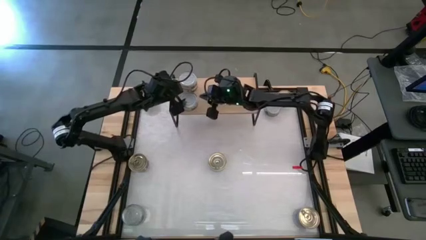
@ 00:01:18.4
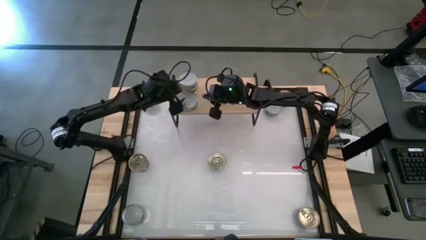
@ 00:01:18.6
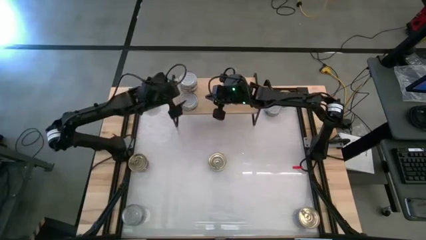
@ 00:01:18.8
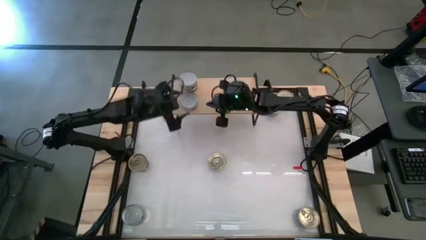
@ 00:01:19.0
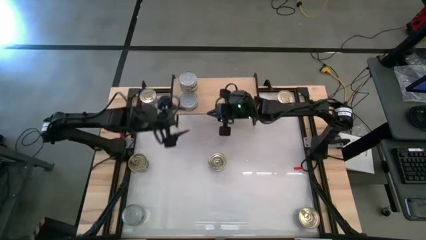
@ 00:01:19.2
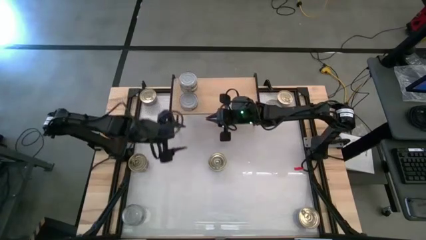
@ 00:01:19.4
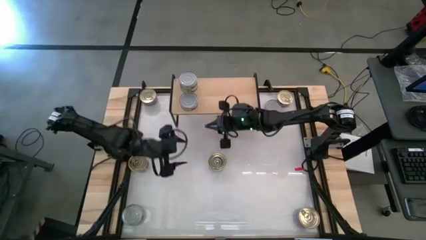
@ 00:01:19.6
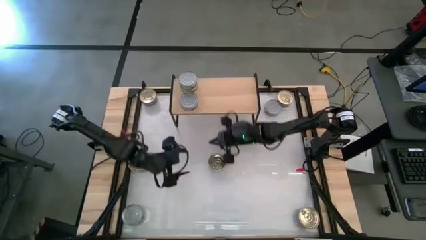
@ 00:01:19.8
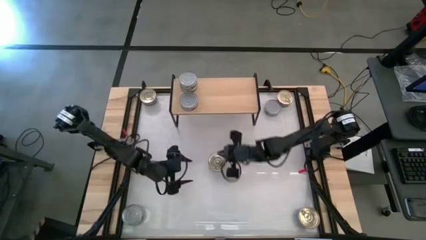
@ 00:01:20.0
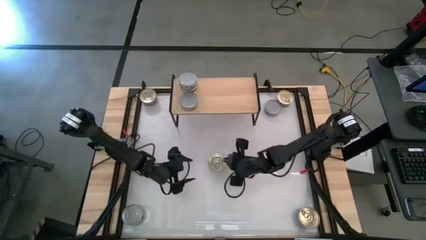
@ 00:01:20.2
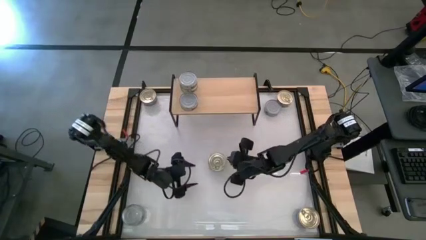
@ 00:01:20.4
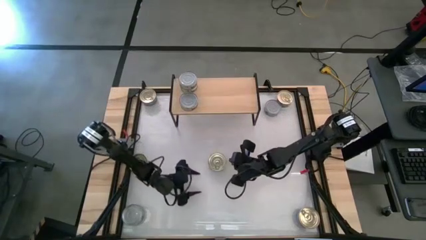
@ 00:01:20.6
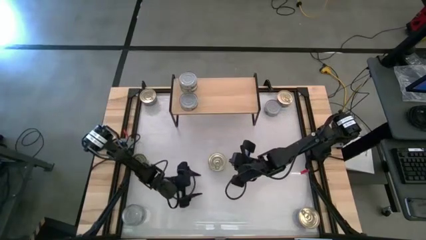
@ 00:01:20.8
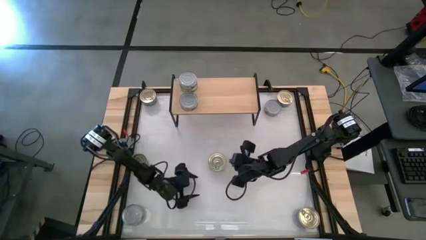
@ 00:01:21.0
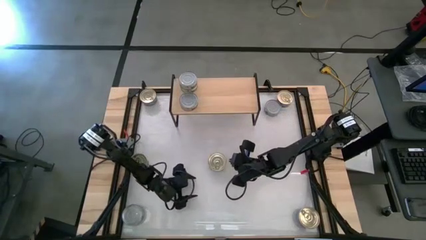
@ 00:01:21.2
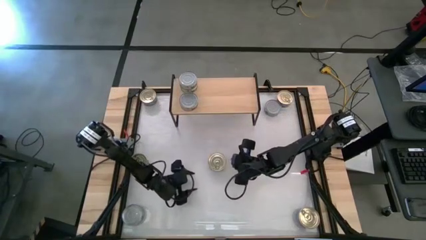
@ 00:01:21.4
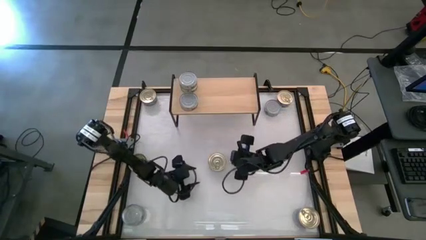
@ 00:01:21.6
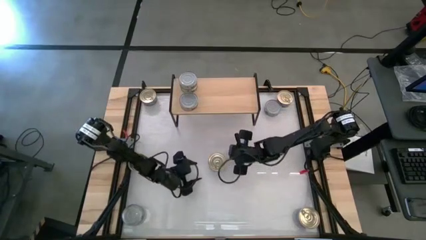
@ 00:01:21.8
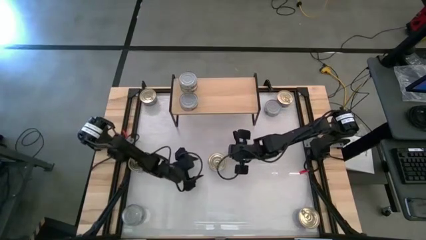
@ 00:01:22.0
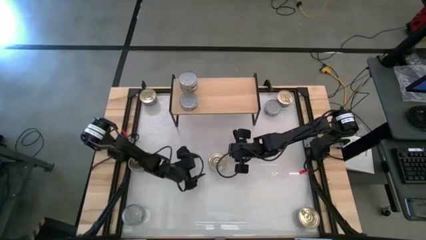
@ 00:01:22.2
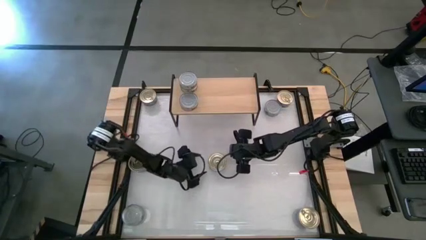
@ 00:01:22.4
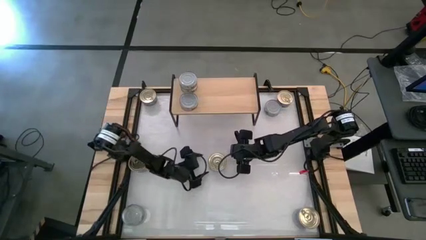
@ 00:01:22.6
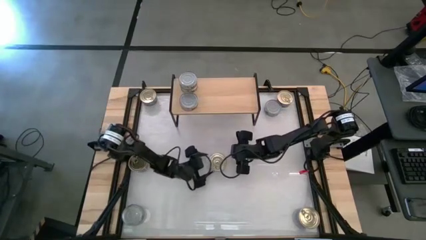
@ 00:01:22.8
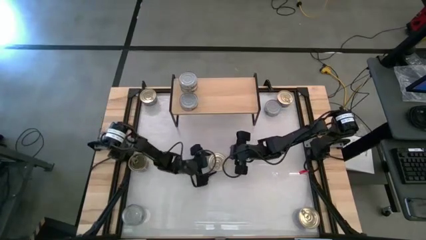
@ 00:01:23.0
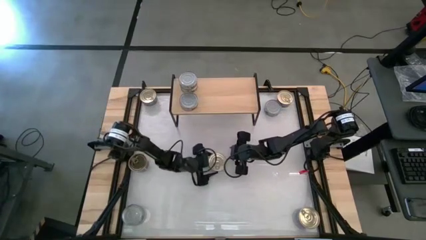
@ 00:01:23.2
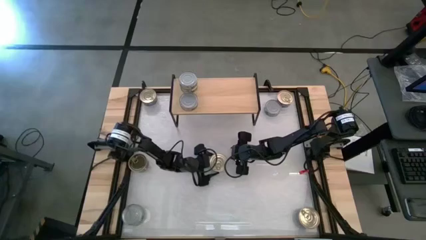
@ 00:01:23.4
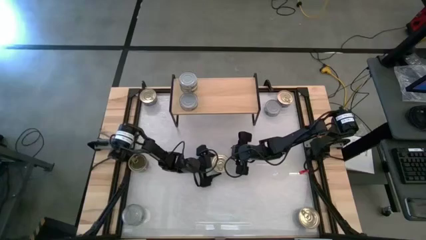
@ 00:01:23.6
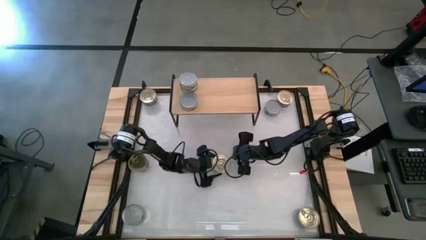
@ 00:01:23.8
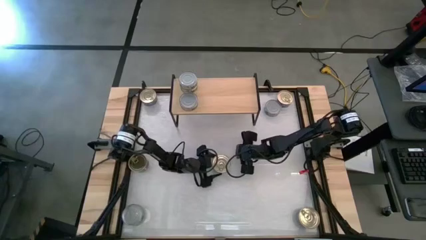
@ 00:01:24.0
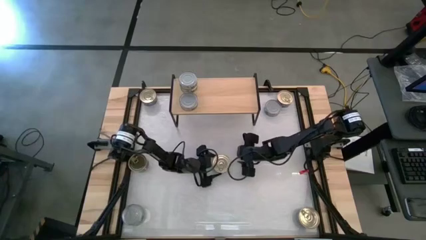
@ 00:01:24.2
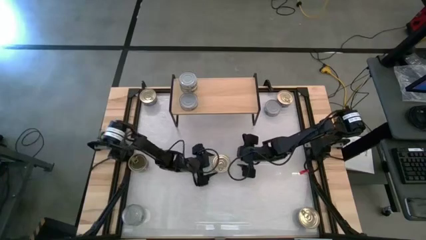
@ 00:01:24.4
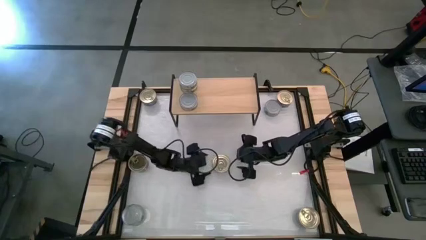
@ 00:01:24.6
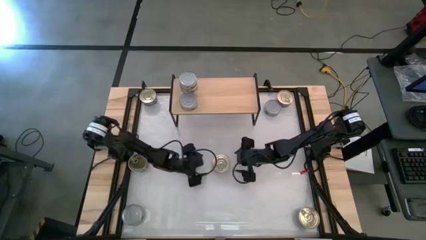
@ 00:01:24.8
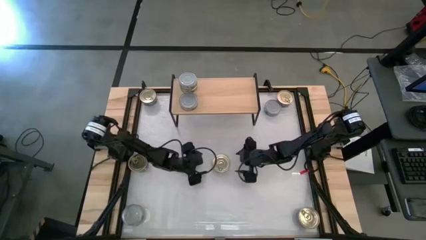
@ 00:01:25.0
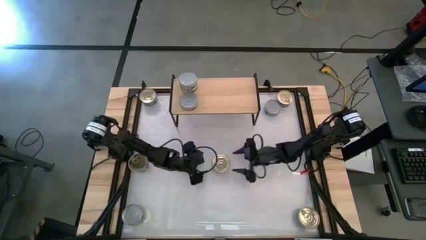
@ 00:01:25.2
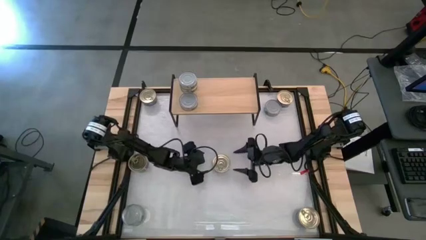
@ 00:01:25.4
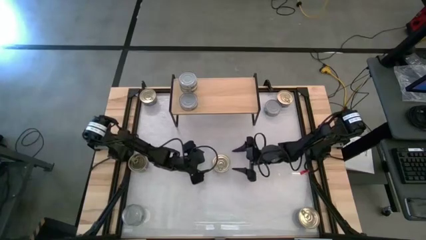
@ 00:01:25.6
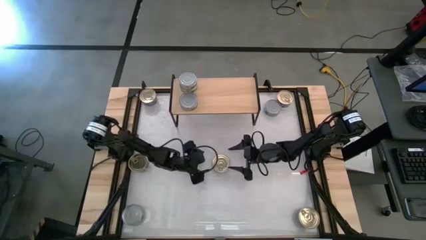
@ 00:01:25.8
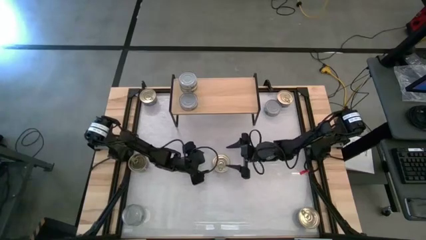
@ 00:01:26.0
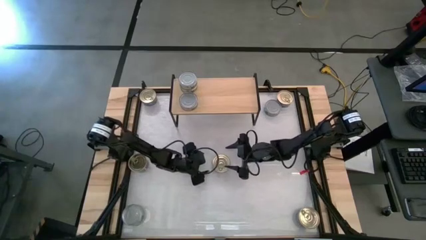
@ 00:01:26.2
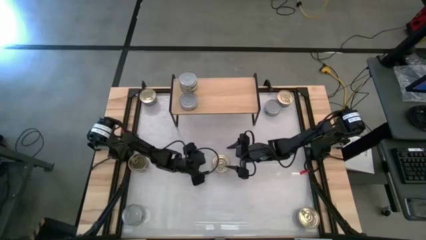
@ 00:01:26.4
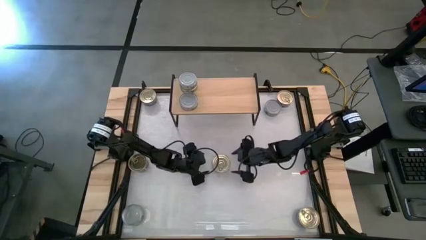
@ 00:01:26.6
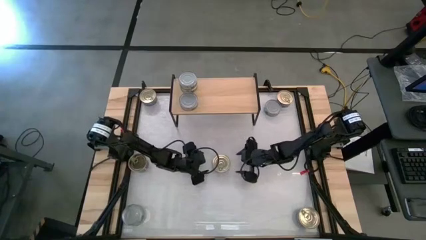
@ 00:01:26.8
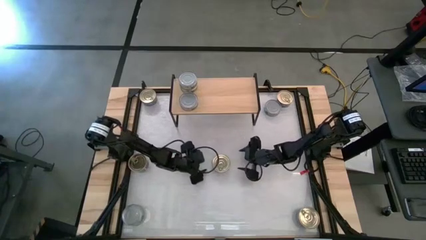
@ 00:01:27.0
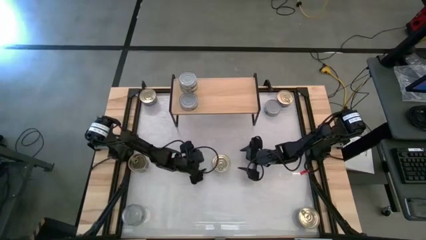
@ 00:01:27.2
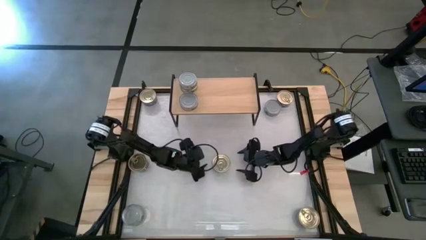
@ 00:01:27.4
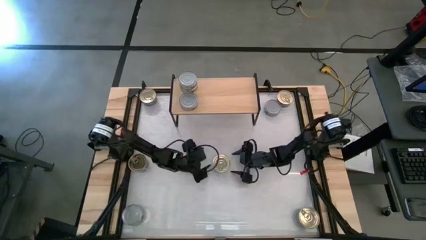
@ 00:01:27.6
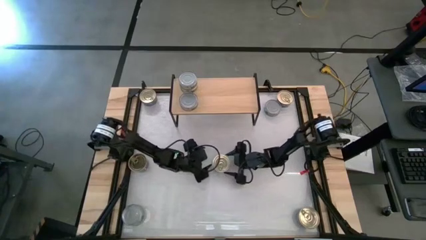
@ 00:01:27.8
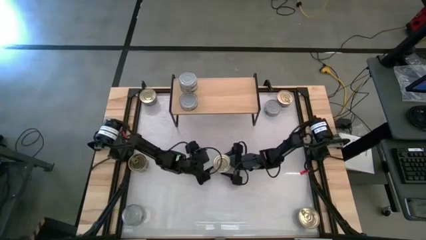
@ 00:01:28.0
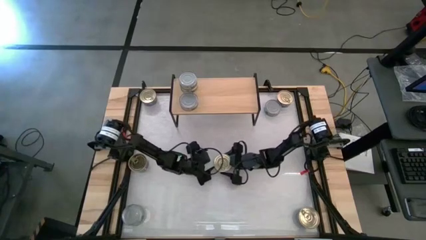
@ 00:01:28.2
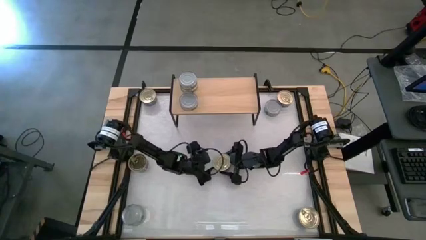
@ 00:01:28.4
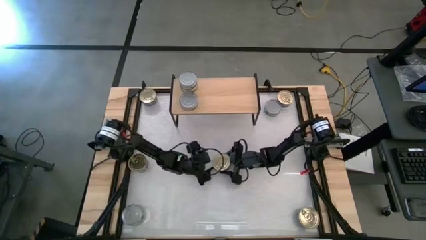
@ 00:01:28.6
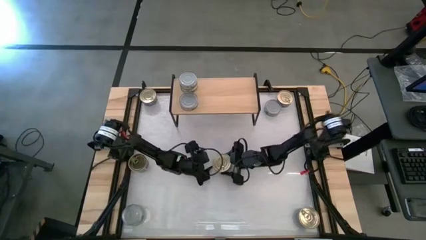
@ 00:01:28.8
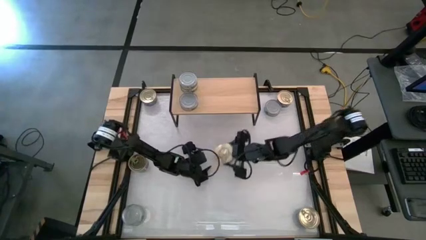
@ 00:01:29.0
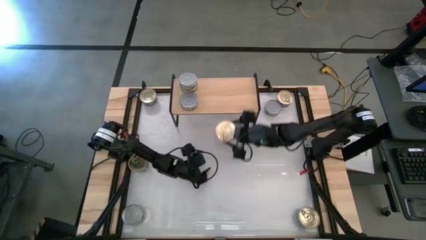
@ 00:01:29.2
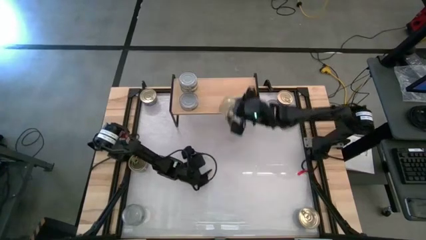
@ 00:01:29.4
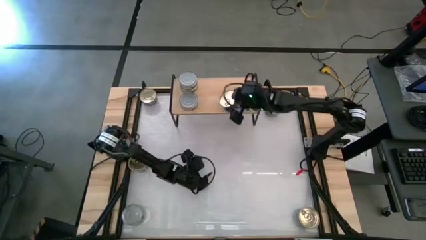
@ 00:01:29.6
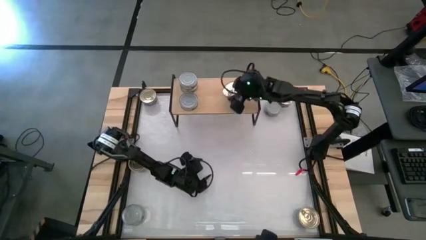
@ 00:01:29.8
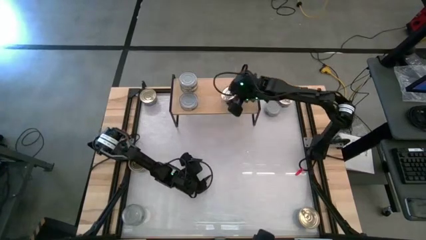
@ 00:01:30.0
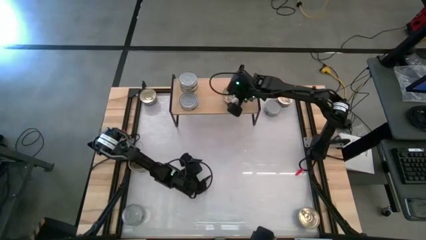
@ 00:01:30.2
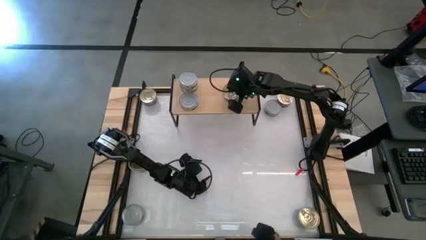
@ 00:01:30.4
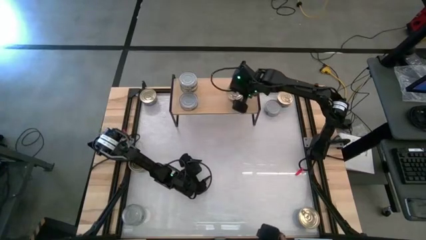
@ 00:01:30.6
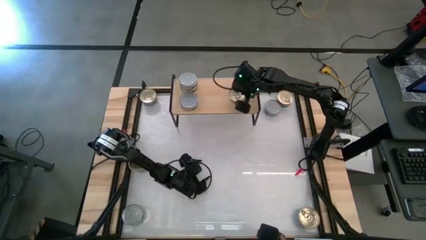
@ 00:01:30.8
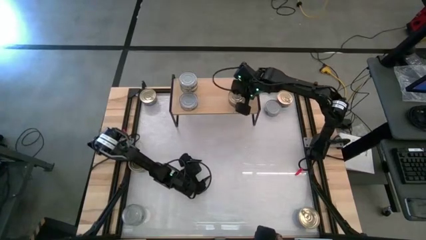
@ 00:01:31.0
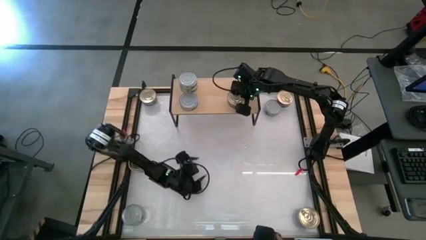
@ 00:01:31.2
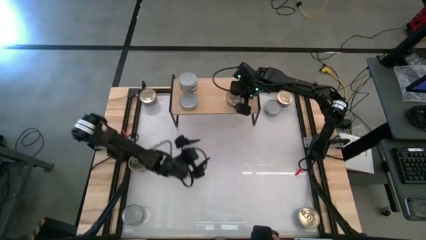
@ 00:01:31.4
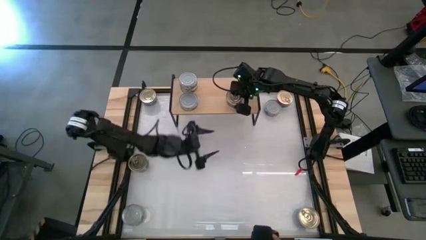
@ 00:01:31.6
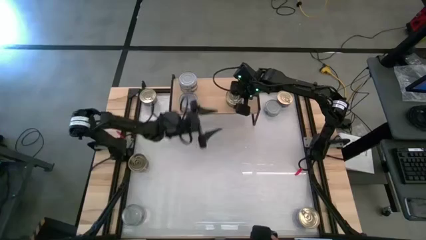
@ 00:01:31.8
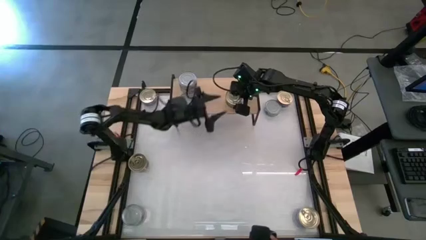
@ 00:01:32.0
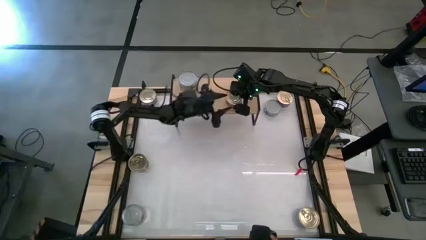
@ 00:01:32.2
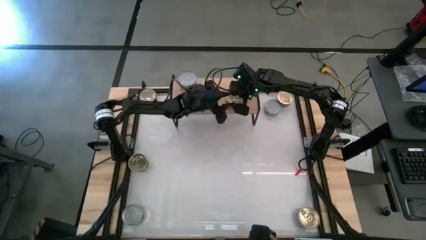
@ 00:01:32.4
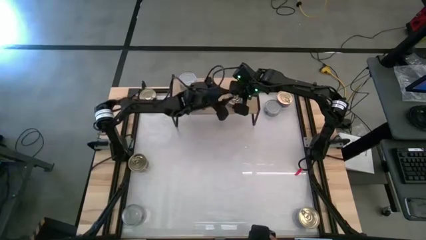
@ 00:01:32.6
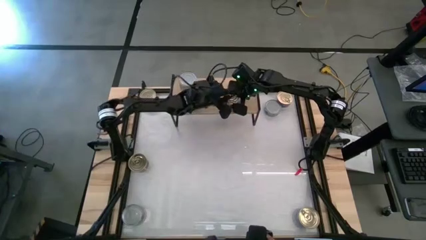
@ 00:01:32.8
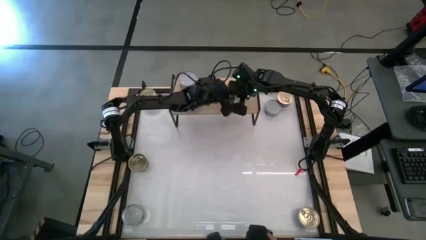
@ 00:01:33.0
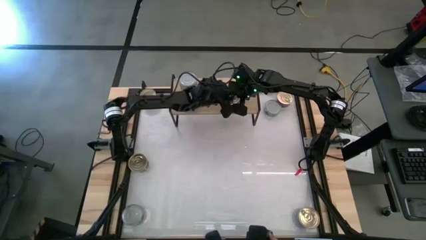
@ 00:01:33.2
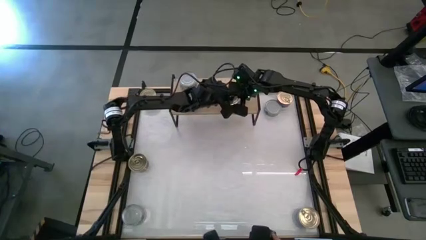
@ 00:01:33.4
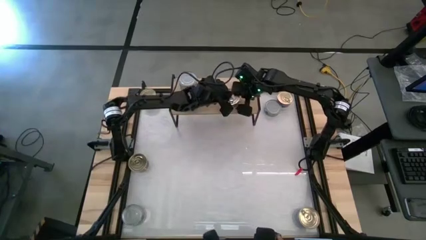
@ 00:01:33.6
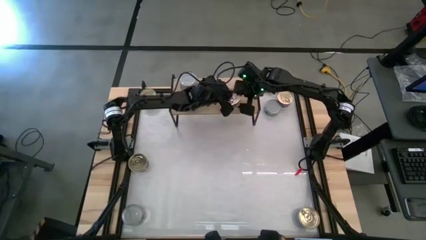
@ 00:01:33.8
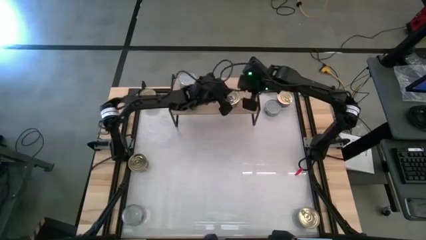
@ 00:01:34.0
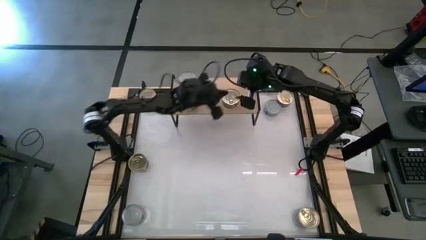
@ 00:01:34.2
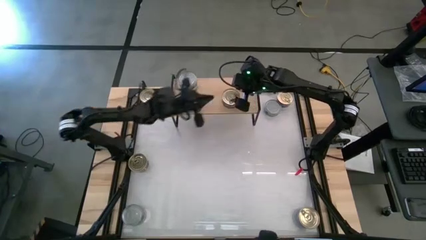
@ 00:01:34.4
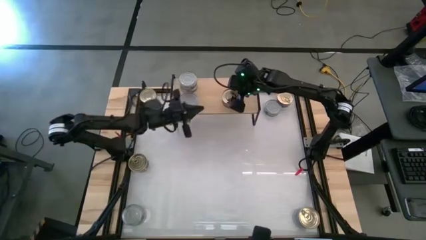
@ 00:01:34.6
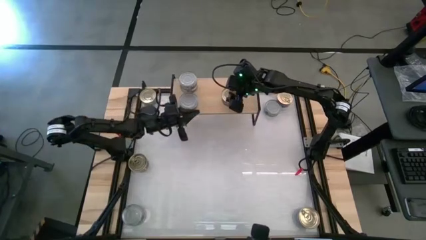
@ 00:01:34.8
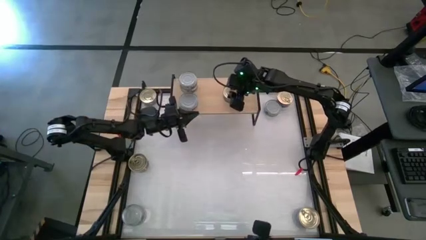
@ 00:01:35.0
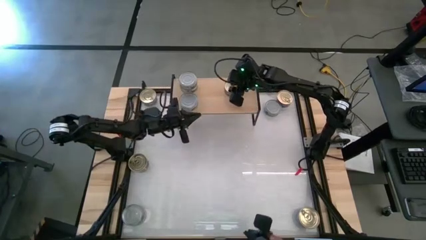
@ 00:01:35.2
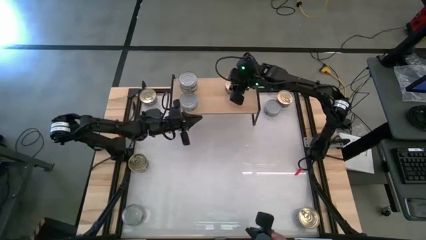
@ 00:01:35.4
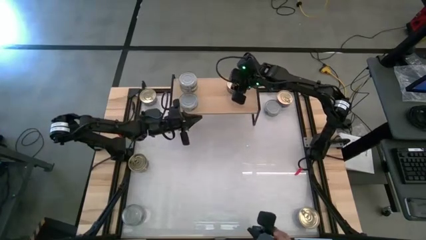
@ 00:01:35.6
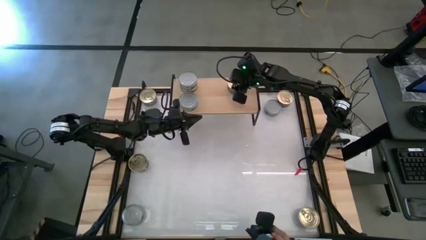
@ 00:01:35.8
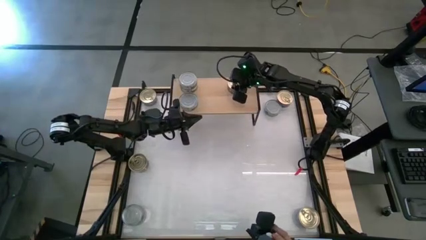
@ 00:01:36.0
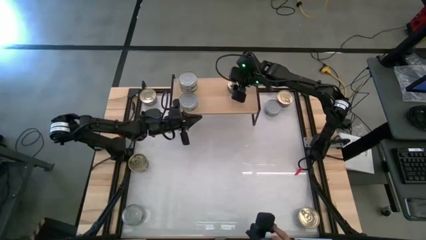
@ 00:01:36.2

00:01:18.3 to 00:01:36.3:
Task: Stack canned seafood by type on shelf
Put the blue tuna can on the shelf
